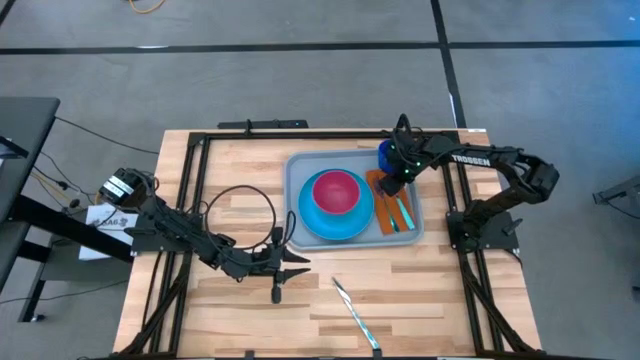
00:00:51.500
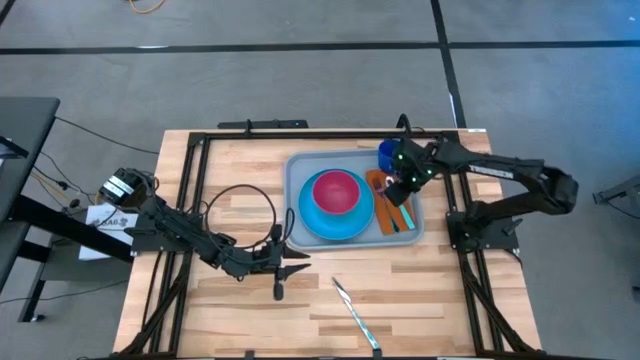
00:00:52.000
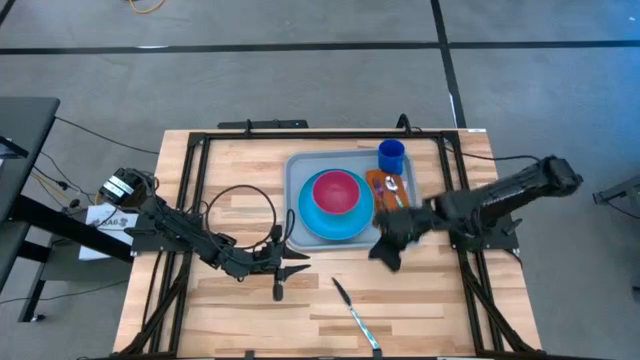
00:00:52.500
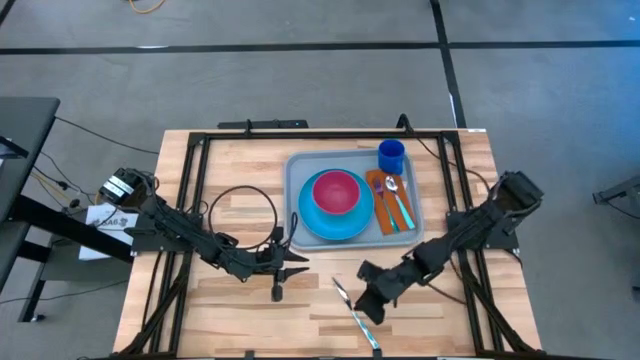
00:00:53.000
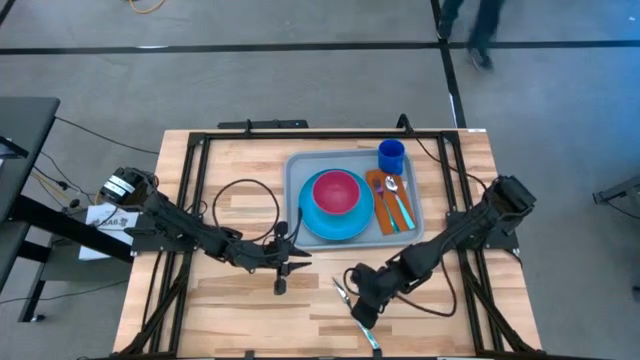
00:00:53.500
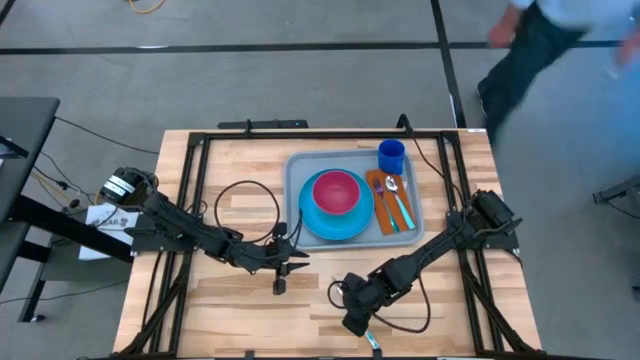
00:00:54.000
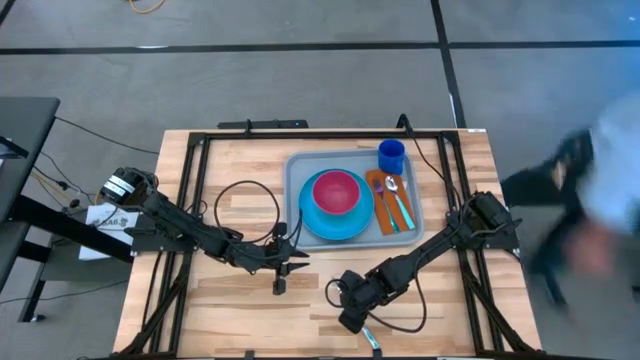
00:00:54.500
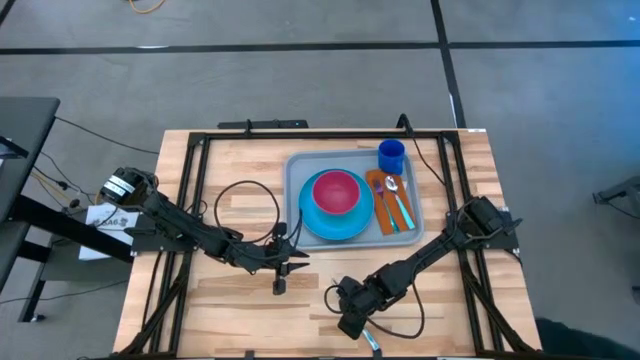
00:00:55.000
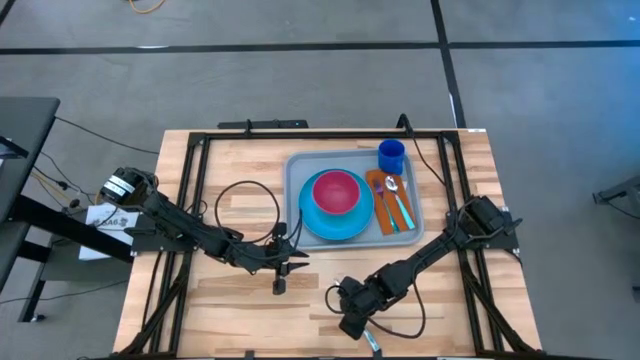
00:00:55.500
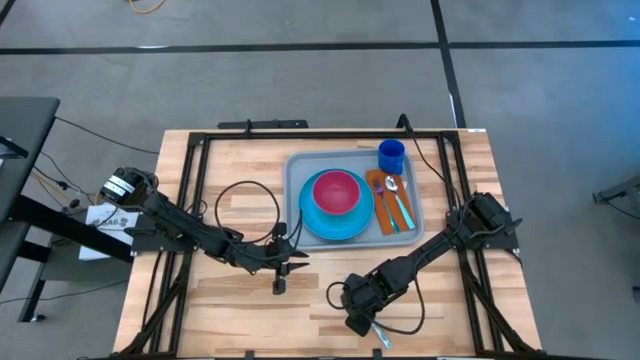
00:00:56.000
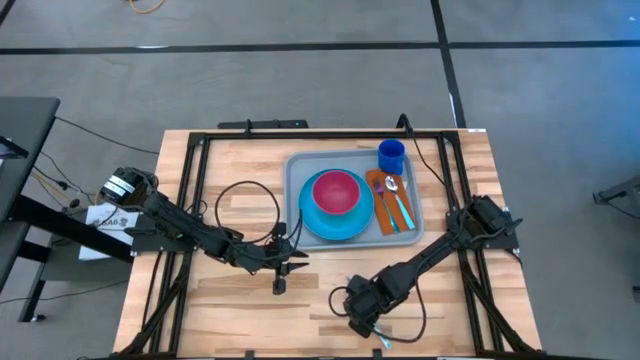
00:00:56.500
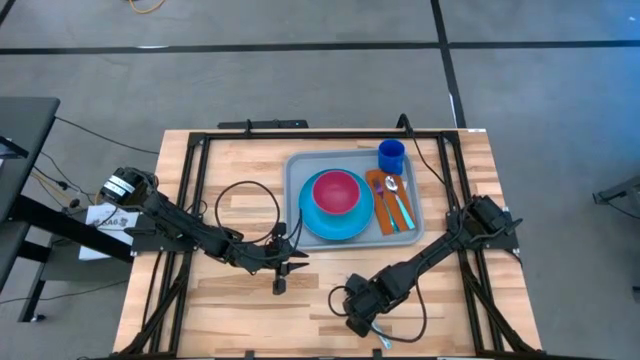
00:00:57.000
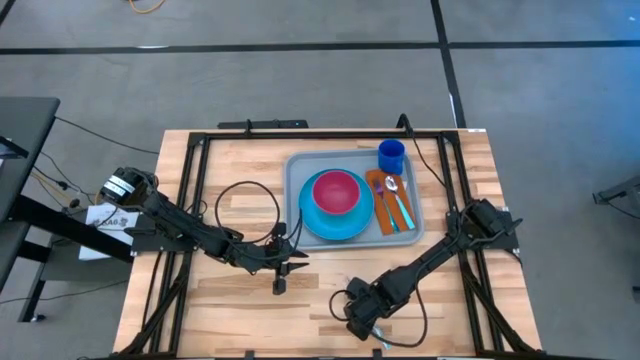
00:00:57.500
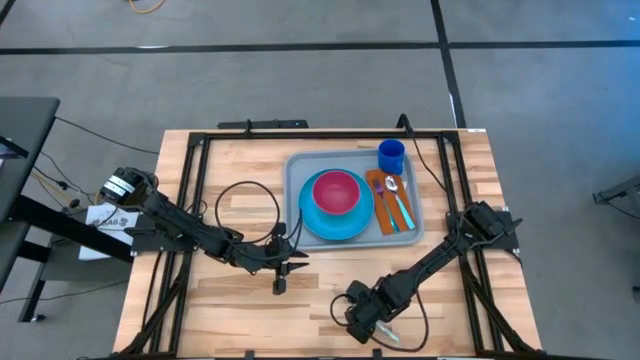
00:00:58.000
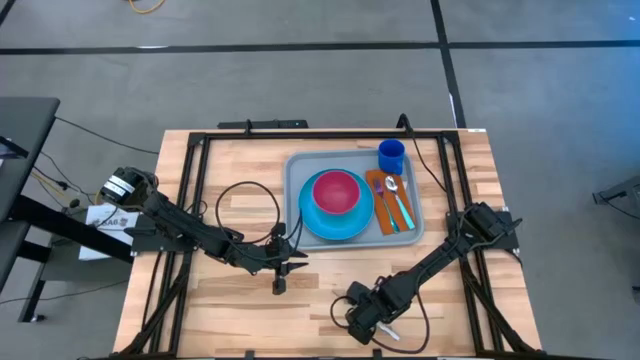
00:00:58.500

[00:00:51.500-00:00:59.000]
Task: Set up tray
Put the blue patterned knife between the blue fork and blue spoon on the brown napkin

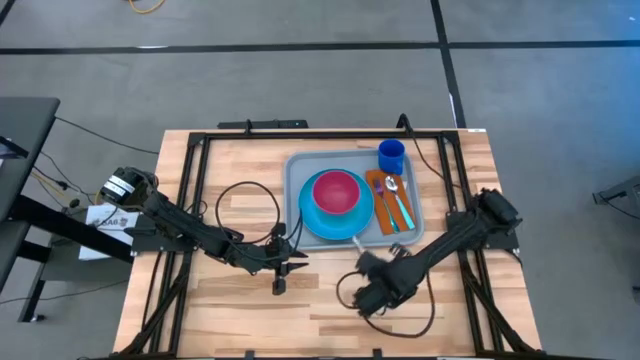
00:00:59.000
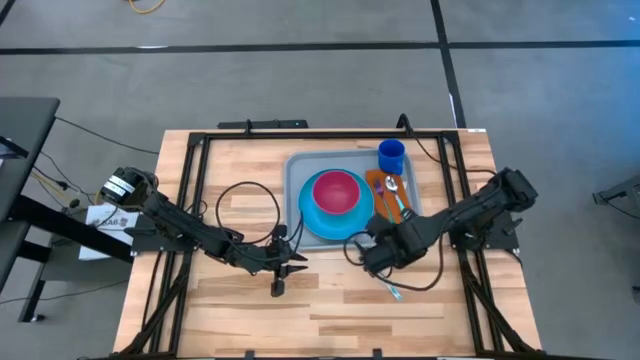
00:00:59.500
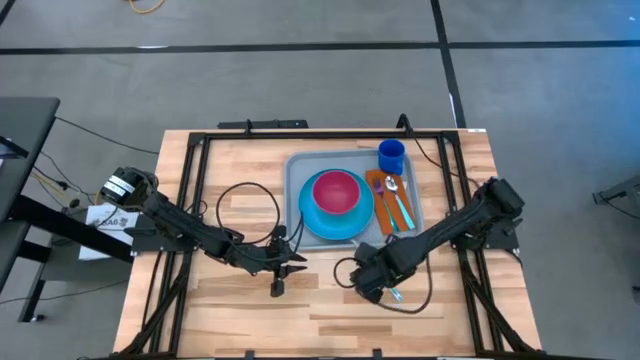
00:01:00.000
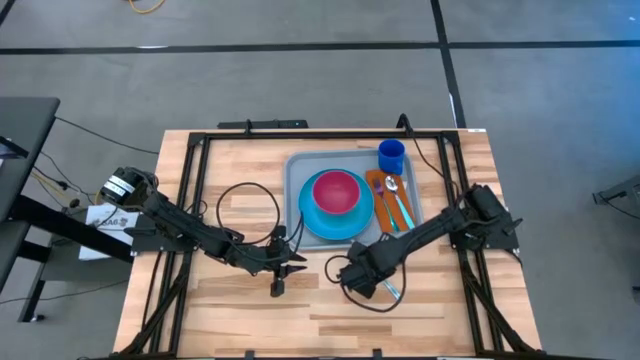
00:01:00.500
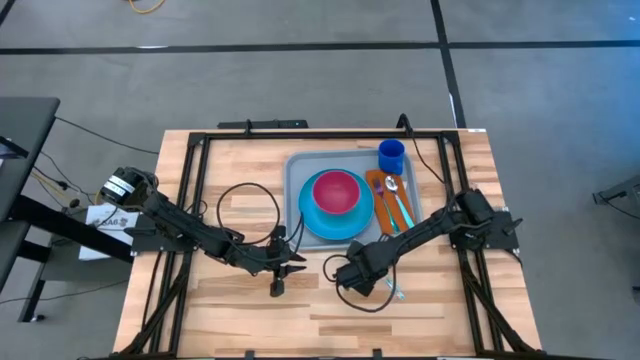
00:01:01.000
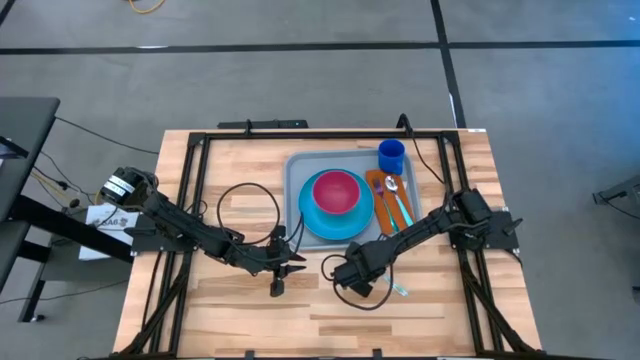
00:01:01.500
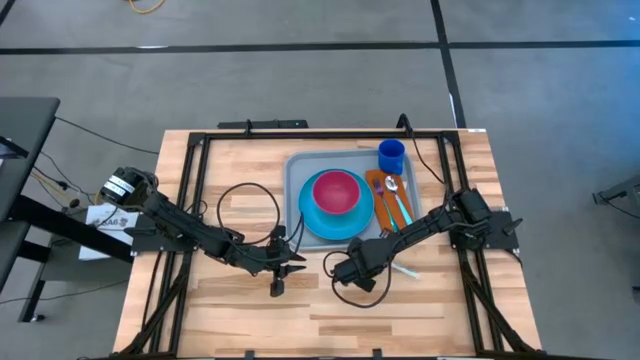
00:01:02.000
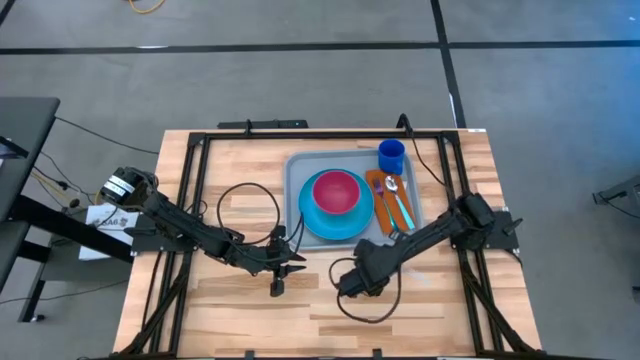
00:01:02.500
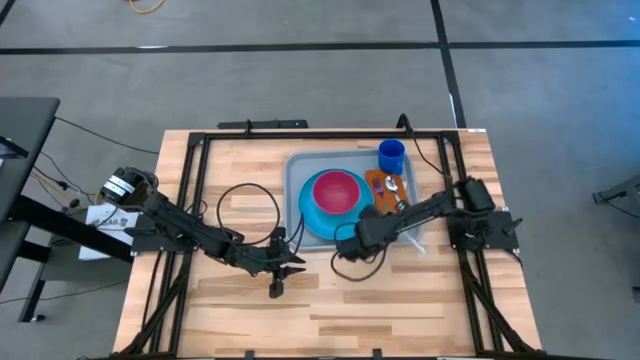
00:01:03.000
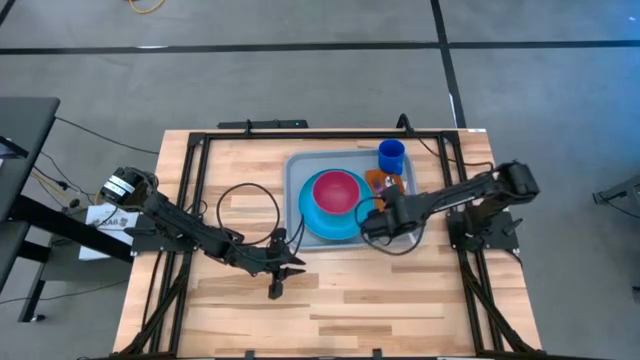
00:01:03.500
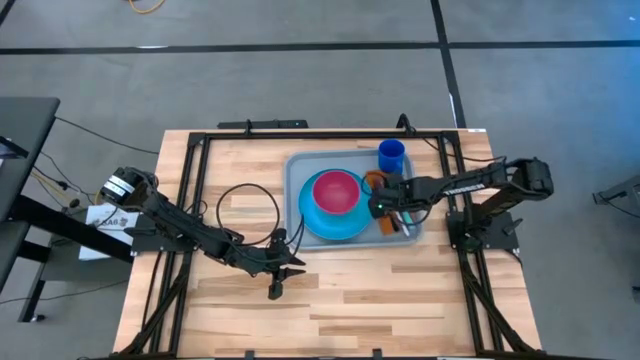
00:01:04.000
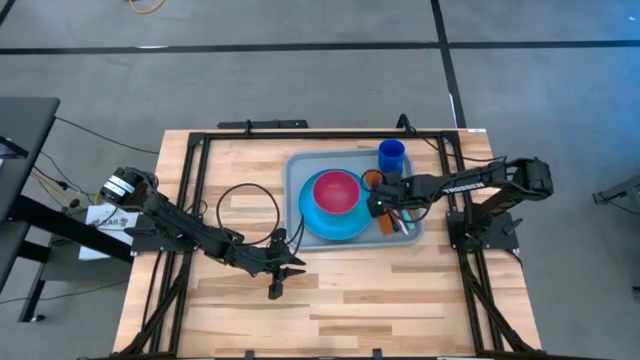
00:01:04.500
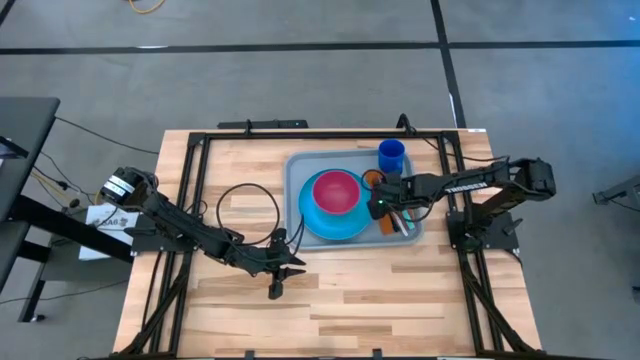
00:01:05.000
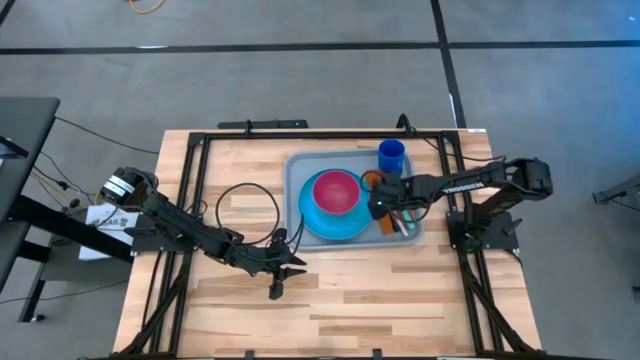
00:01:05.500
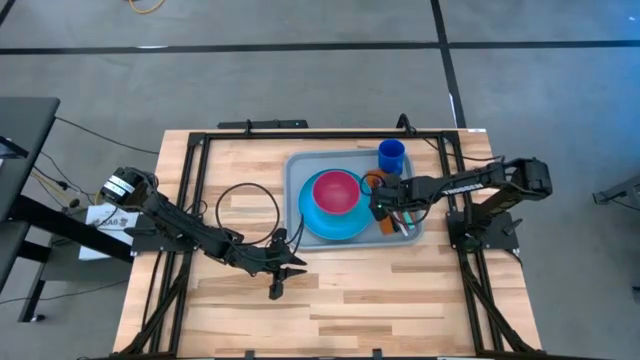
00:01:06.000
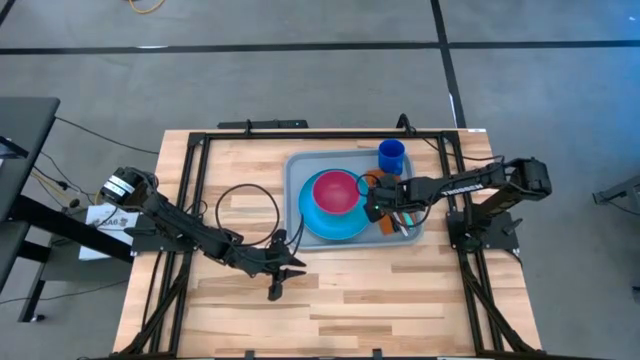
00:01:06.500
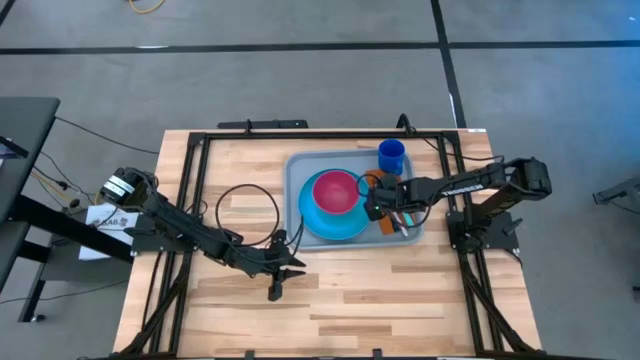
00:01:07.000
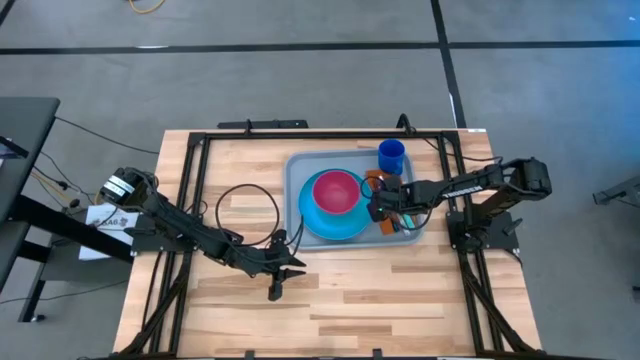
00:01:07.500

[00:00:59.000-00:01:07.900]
Put the blue patterned knife between the blue fork and blue spoon on the brown napkin

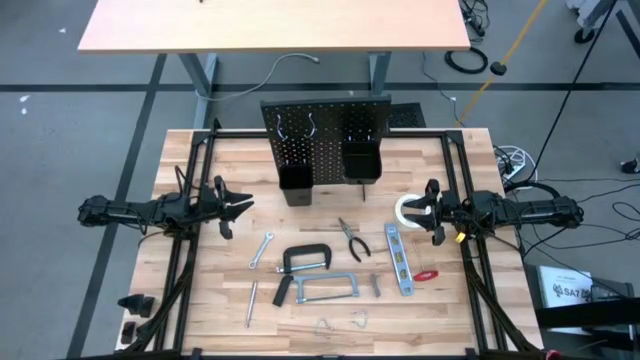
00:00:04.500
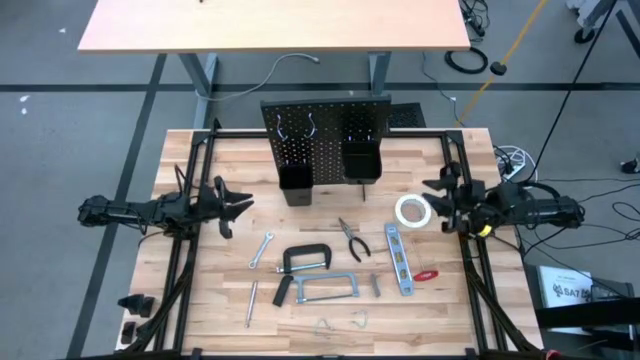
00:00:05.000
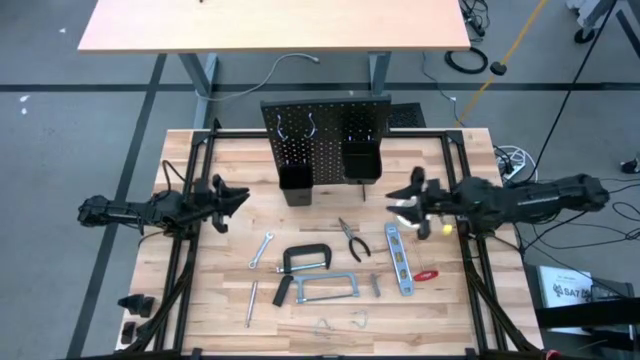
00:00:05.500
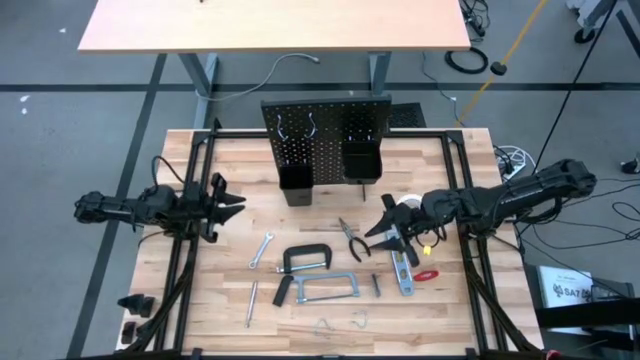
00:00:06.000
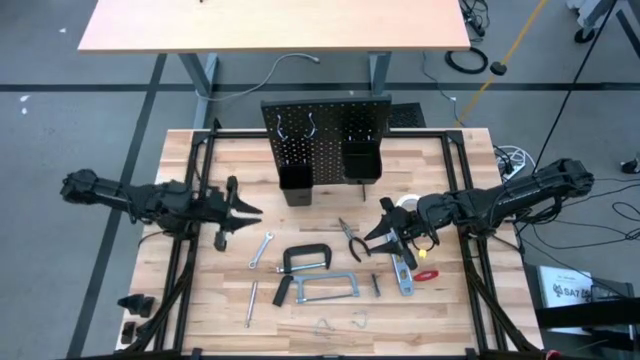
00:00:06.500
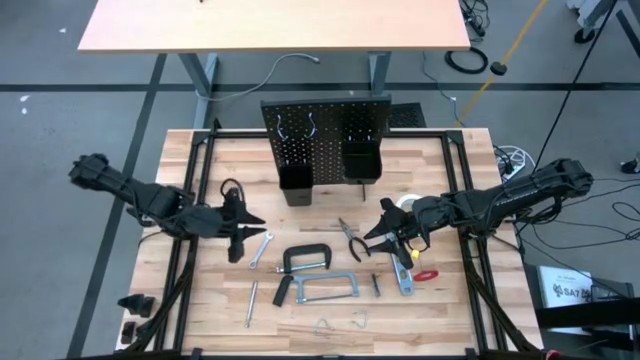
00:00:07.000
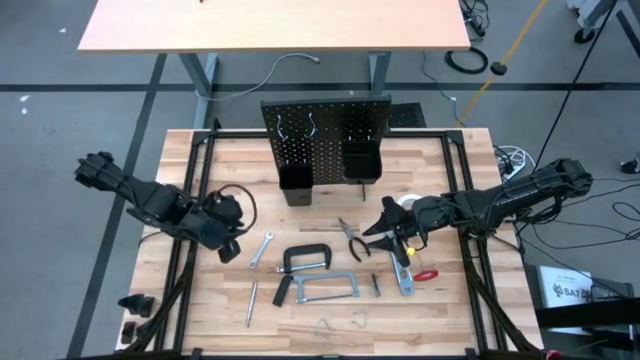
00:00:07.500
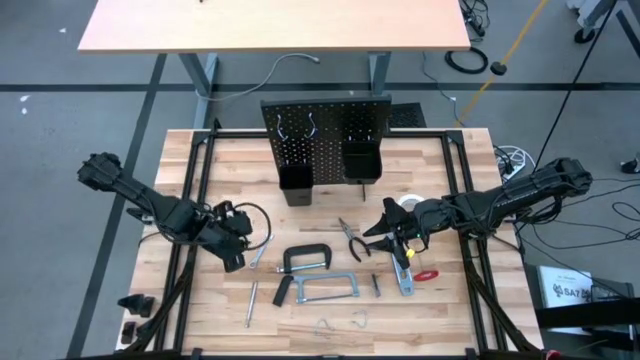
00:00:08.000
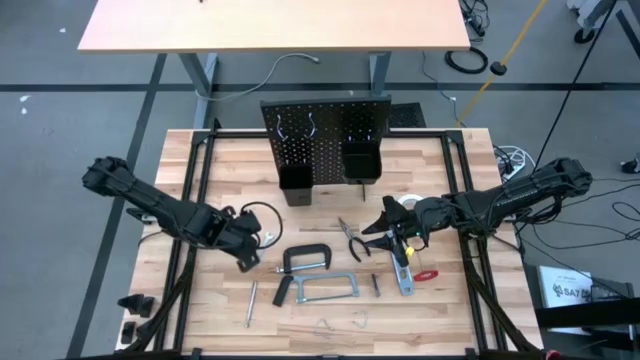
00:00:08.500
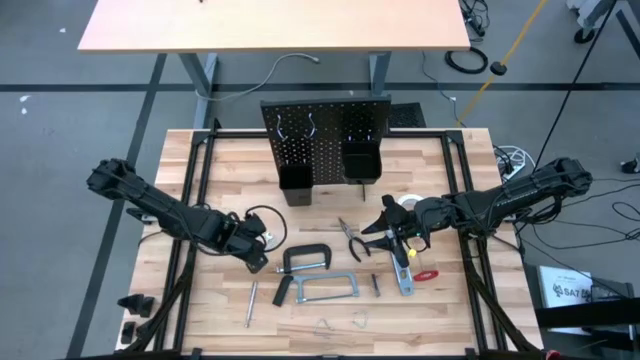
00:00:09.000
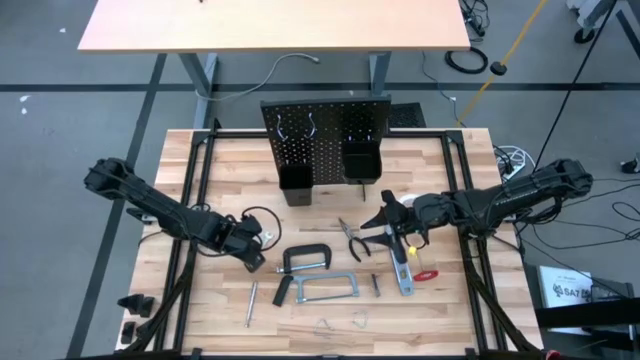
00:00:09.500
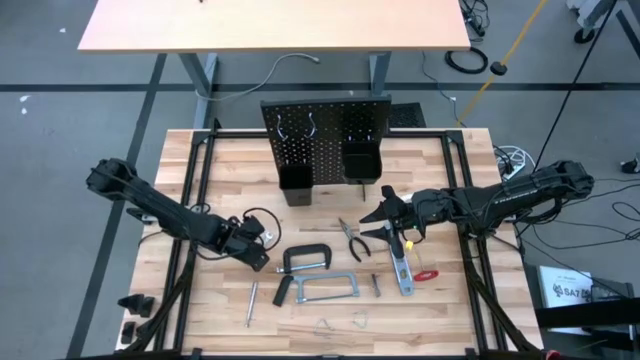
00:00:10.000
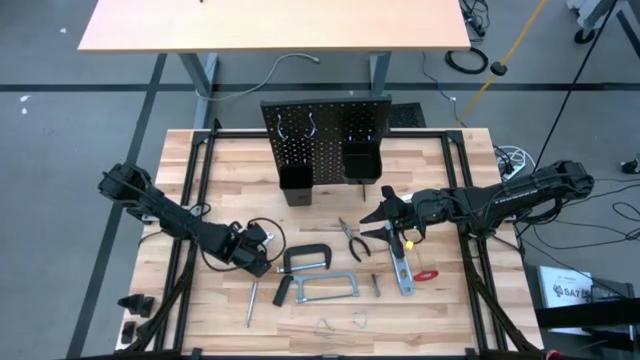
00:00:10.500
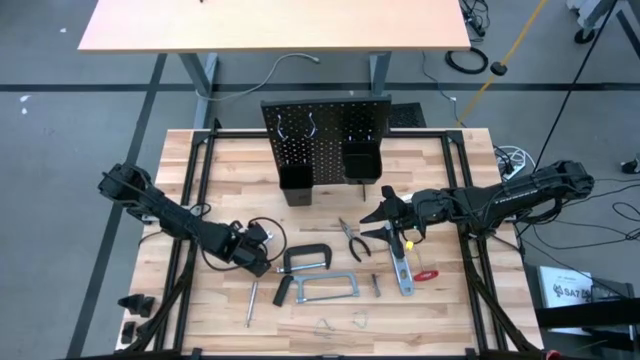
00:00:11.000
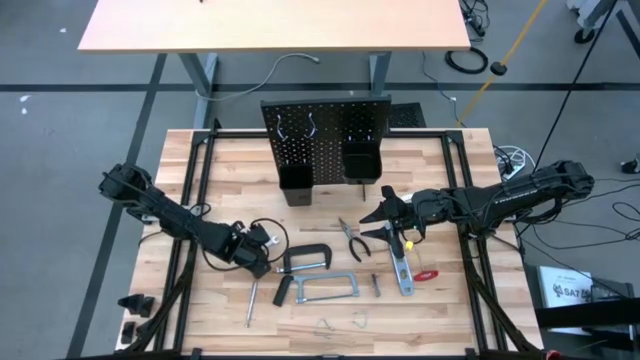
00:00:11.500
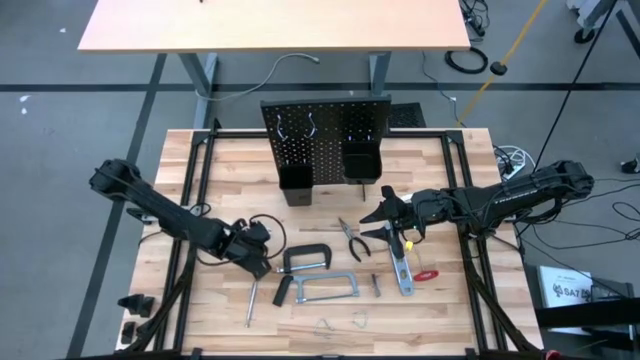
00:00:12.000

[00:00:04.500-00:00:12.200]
Task: Hang tools onto peg board
Put the wrench into the bottom black bin on the peg board
